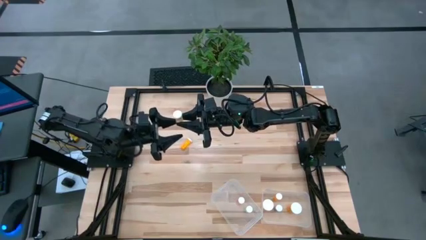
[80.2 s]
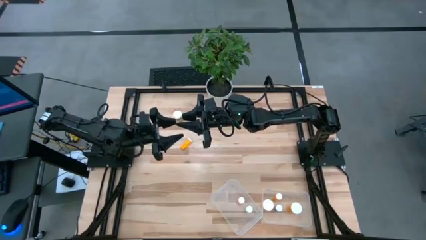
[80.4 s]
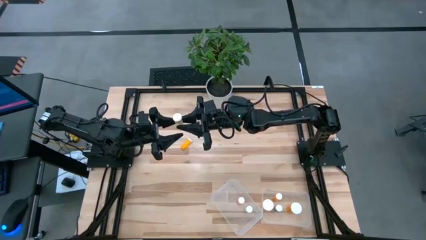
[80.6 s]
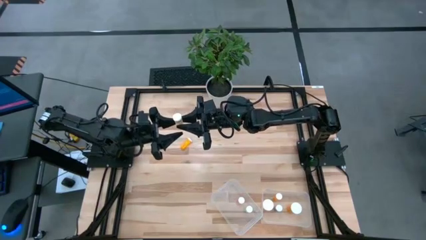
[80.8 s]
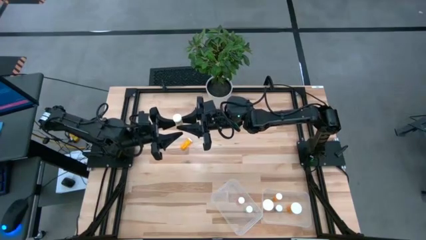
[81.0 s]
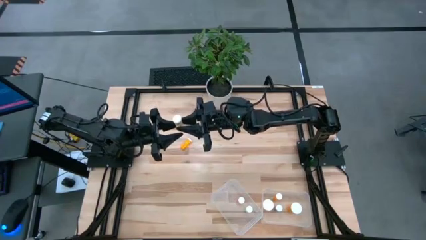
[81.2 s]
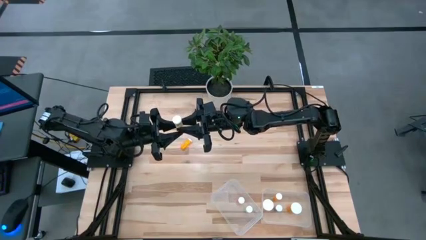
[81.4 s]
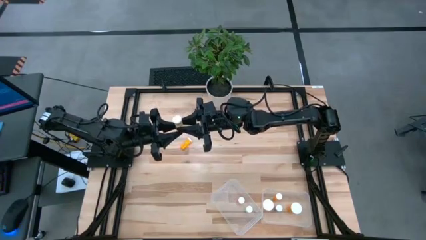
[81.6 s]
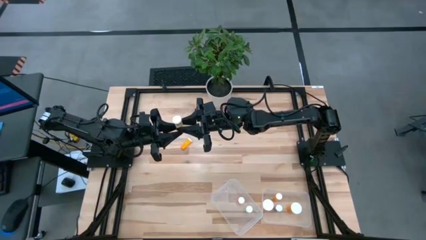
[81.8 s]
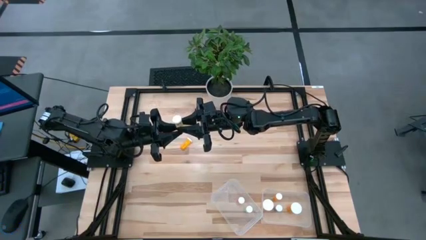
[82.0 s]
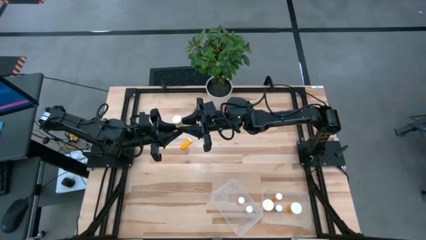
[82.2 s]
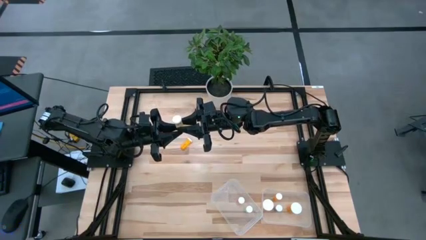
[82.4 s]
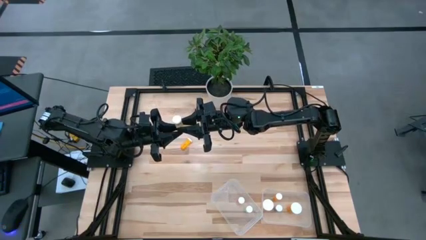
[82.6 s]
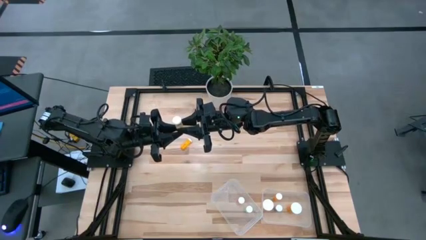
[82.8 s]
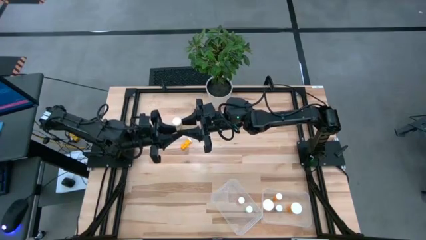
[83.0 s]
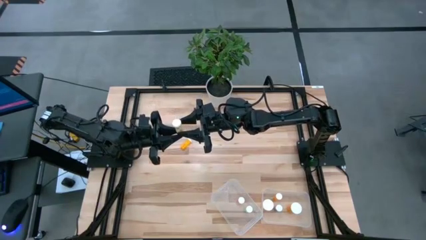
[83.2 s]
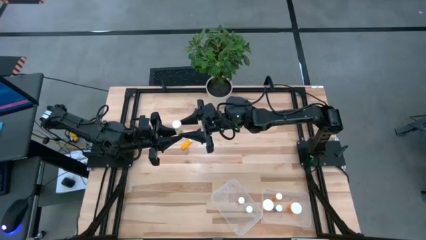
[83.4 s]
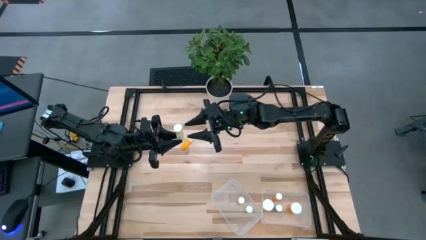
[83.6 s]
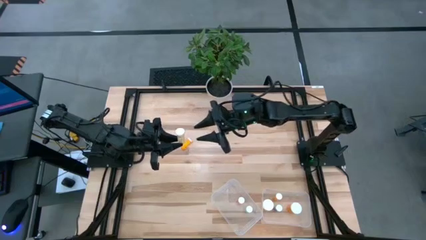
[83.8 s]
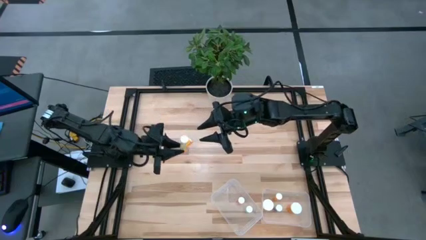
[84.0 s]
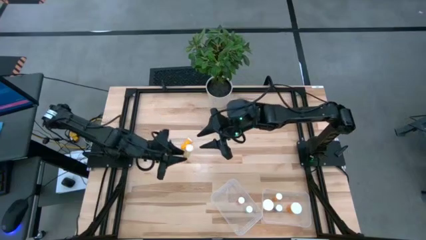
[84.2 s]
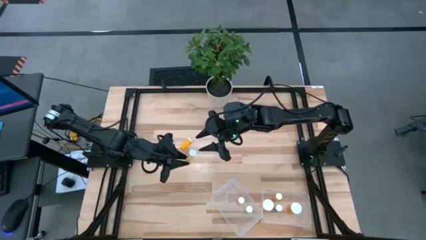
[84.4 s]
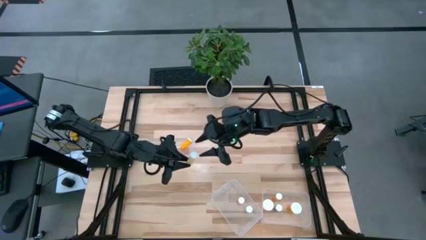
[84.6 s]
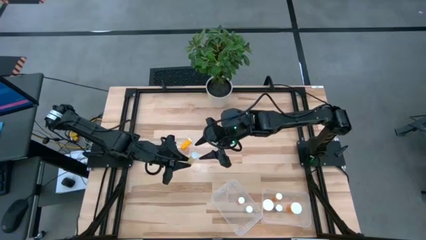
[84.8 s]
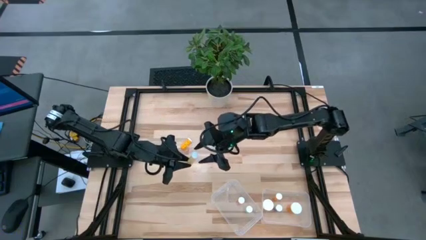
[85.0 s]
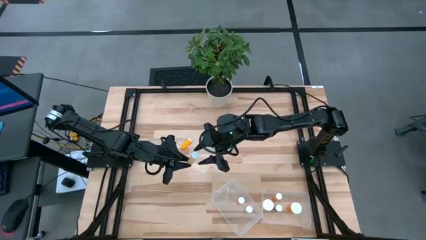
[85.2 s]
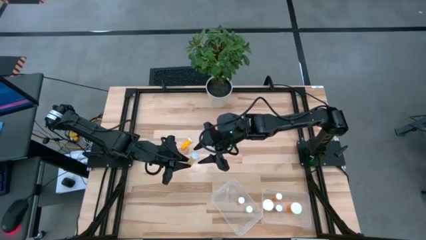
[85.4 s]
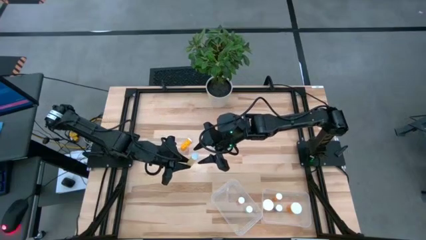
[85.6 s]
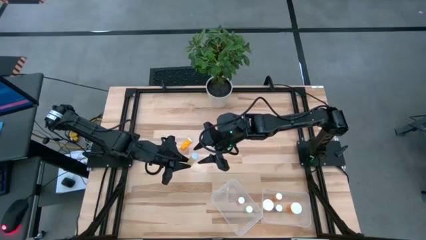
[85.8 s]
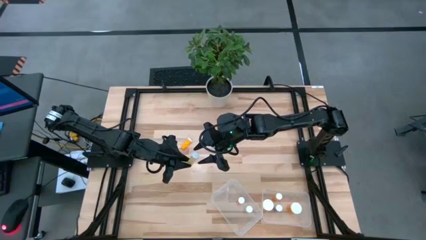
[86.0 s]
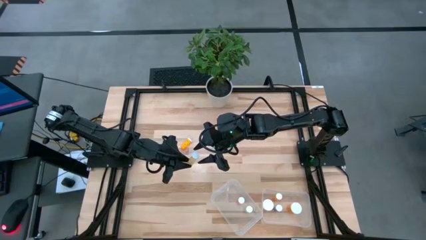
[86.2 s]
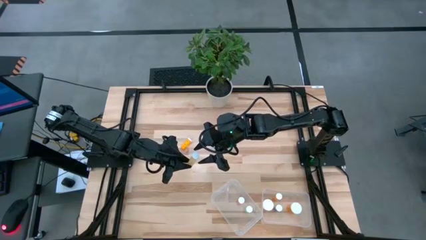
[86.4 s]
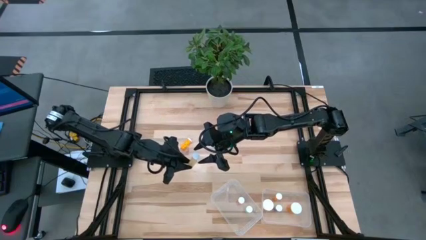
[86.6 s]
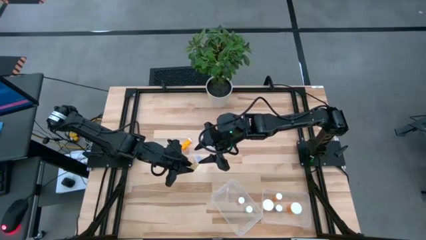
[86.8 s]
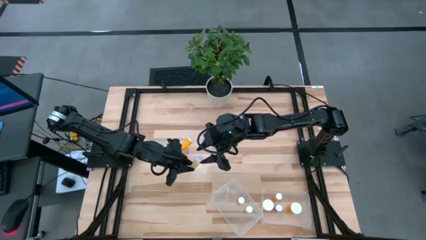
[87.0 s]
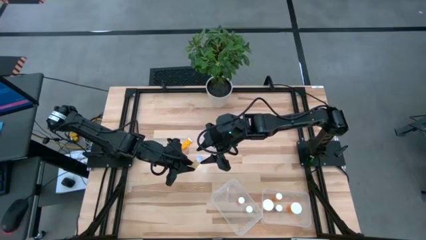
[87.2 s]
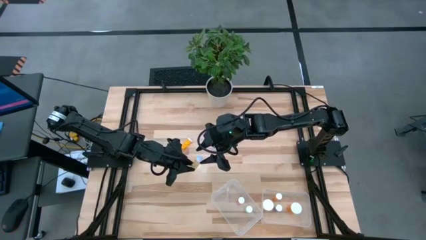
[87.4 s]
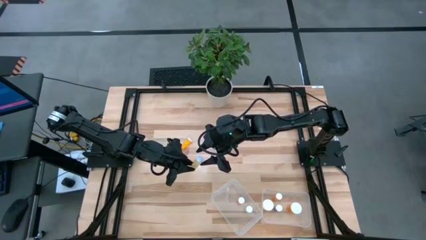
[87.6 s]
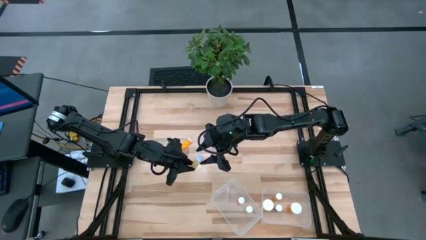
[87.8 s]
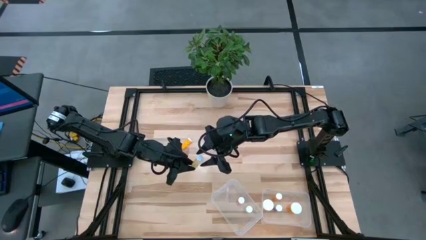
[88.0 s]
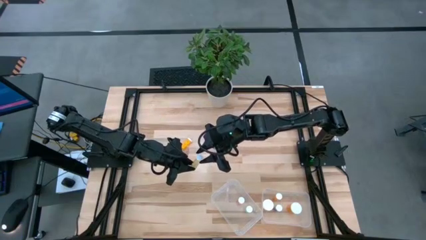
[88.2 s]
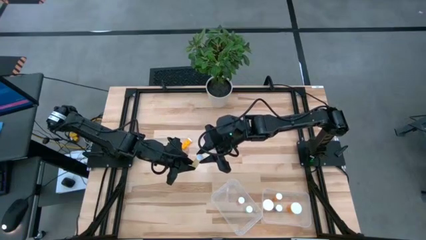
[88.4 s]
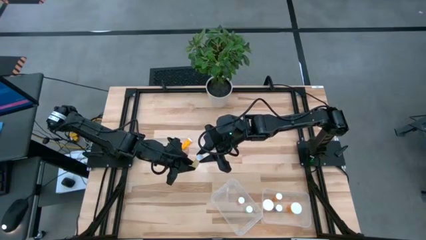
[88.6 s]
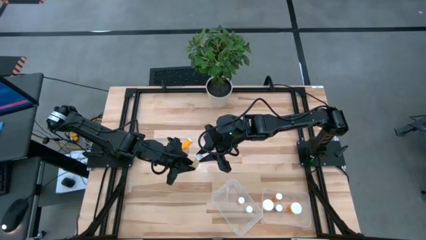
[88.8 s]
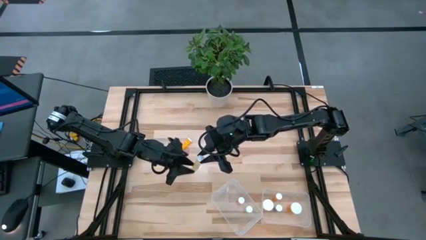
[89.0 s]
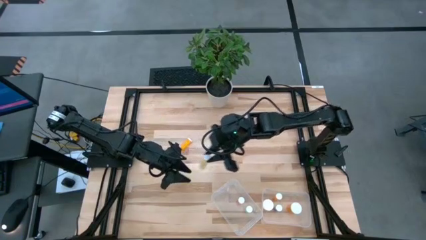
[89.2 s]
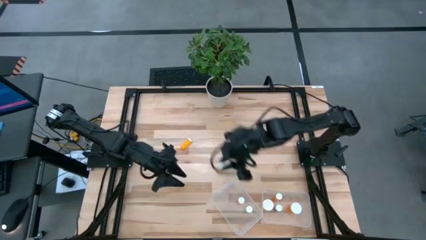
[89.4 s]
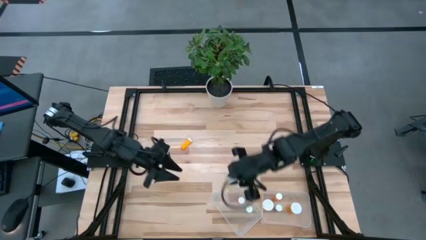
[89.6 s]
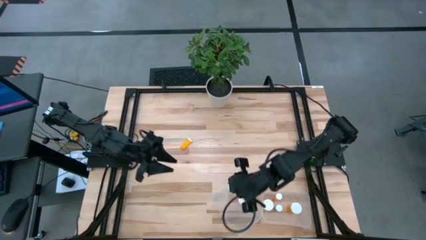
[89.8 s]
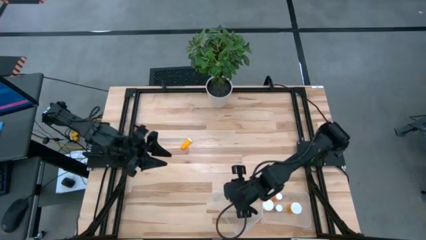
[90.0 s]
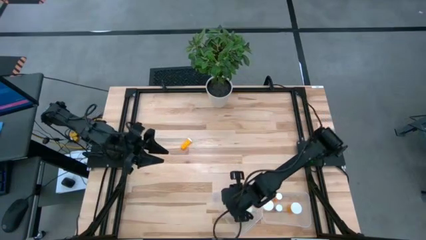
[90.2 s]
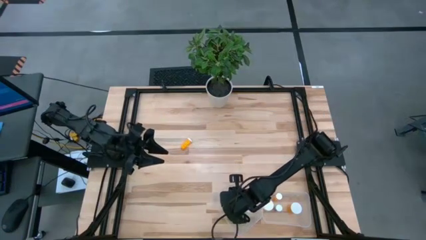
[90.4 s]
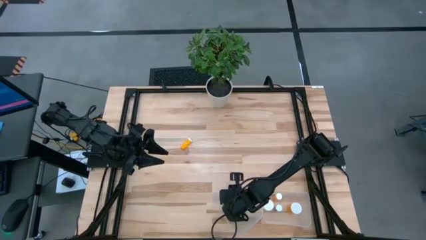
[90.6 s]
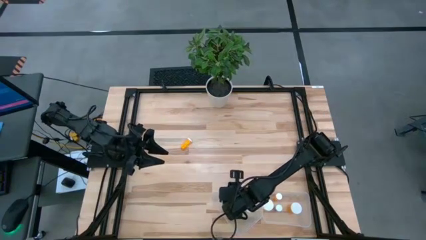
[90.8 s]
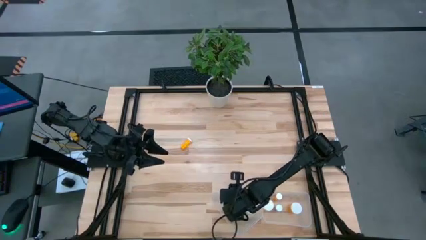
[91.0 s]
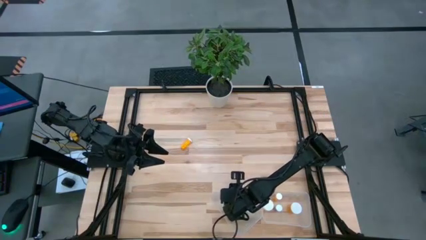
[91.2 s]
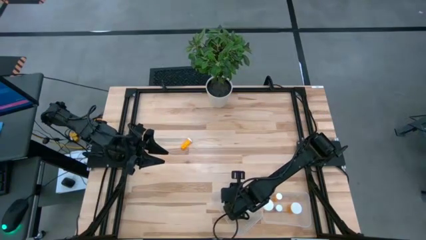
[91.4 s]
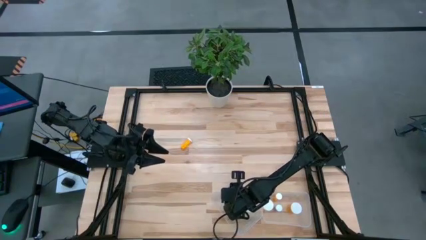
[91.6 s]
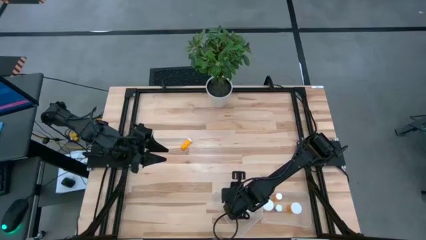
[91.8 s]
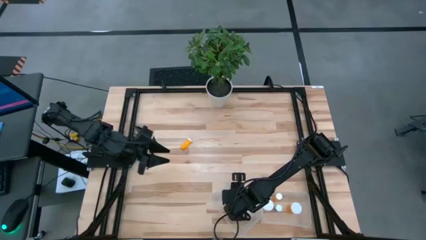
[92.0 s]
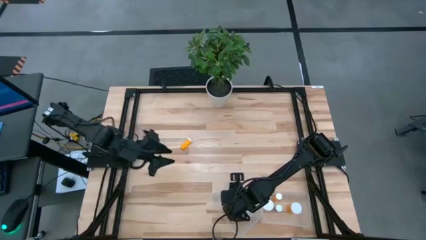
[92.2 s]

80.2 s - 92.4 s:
Task: Pick and place medicine bottles into bin by pill shape (circle, oval)
Put the yellow pill bottle into the left transparent bin

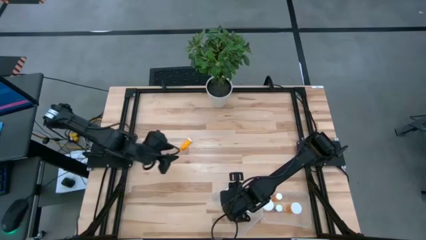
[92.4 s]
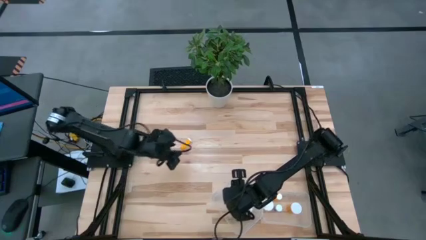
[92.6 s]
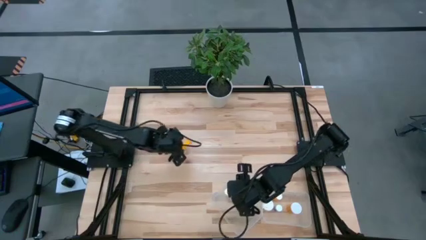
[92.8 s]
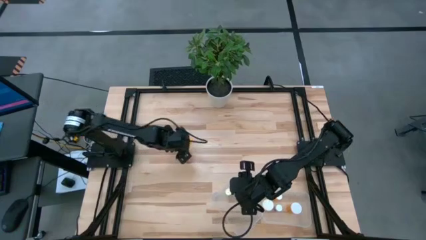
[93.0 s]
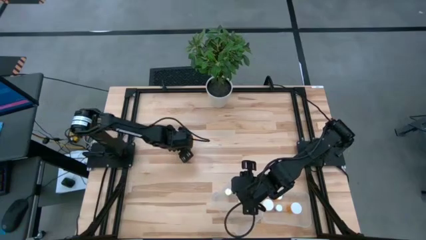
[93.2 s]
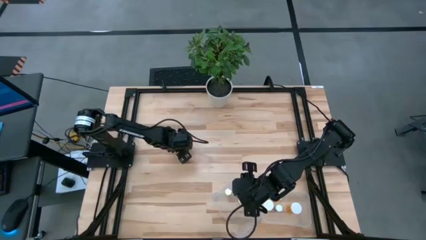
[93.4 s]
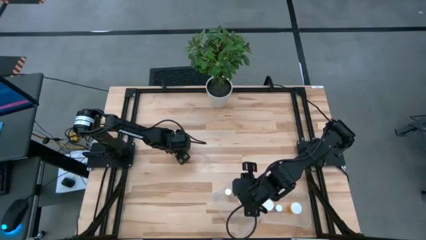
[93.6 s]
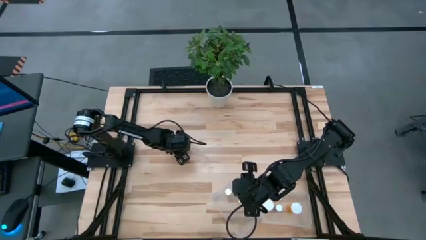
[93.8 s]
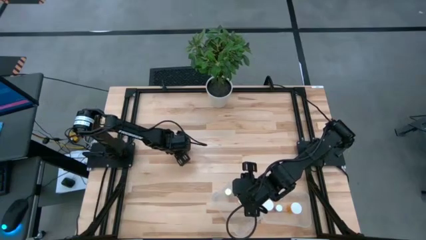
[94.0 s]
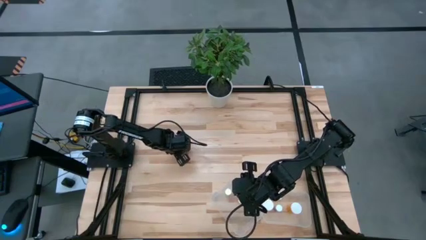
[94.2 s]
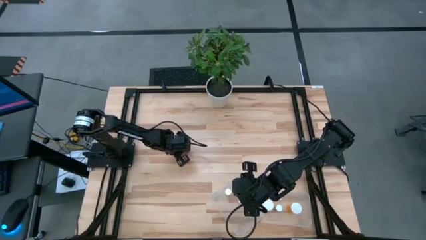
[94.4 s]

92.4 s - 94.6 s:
Put the small orange pill bottle into the left transparent bin

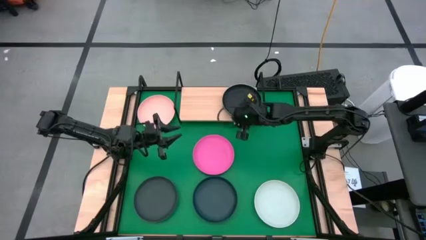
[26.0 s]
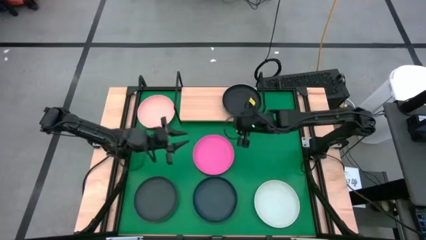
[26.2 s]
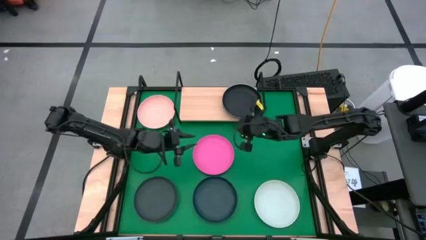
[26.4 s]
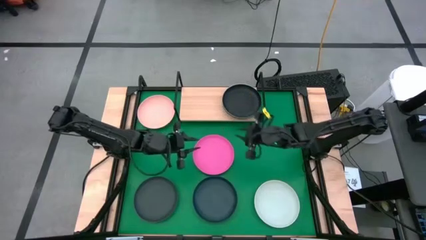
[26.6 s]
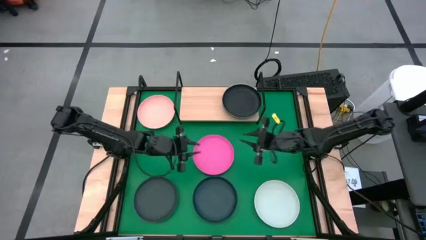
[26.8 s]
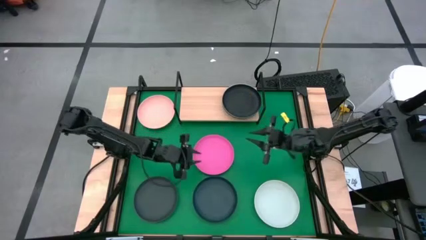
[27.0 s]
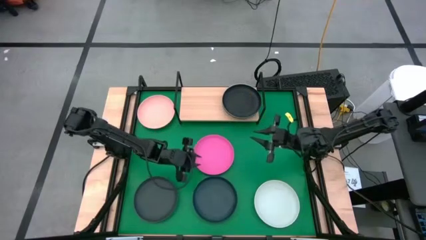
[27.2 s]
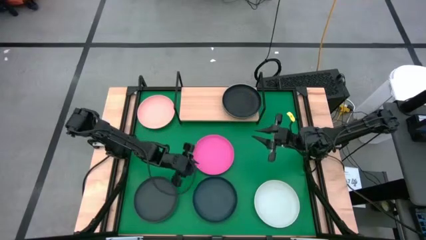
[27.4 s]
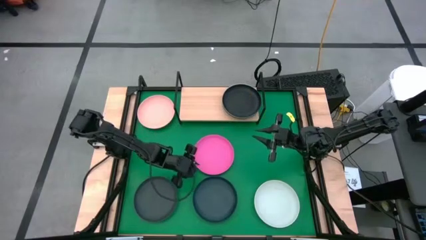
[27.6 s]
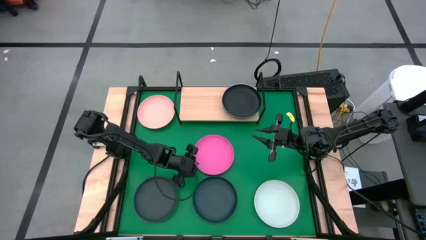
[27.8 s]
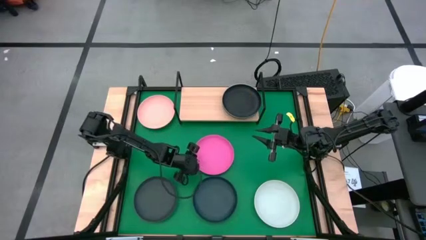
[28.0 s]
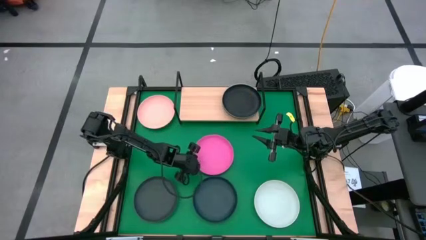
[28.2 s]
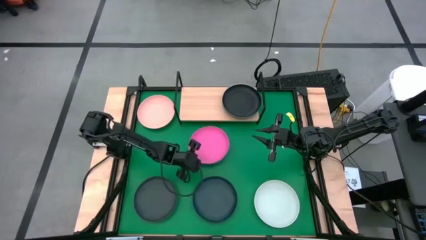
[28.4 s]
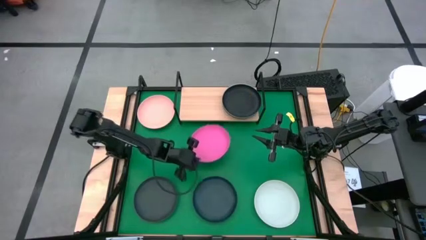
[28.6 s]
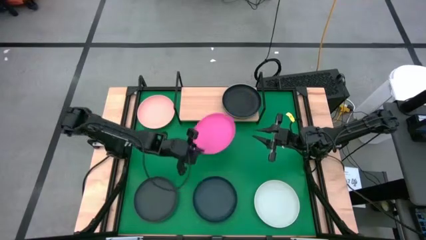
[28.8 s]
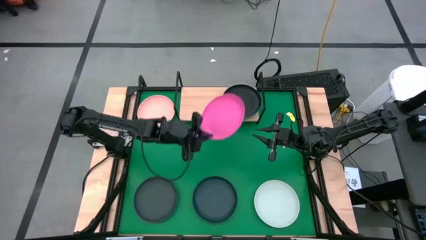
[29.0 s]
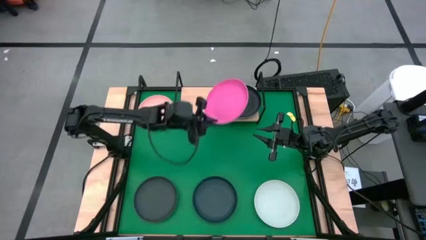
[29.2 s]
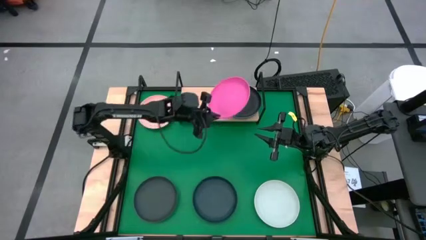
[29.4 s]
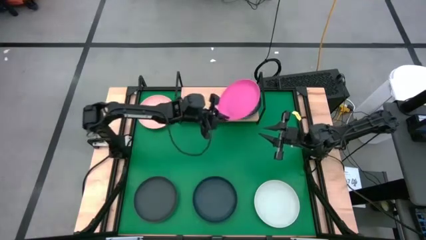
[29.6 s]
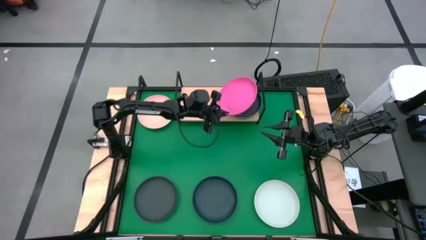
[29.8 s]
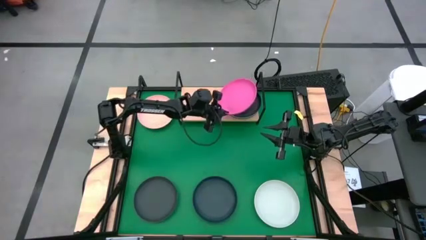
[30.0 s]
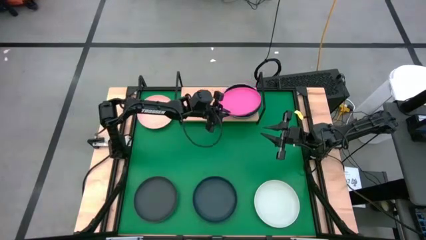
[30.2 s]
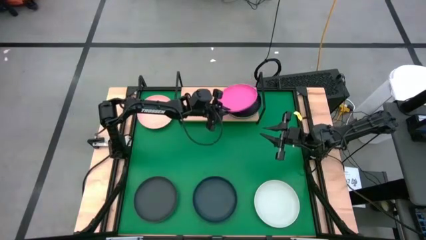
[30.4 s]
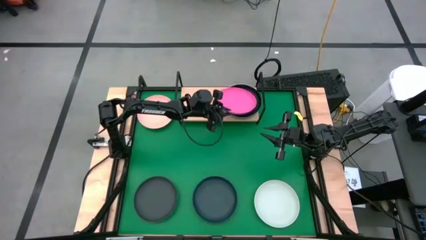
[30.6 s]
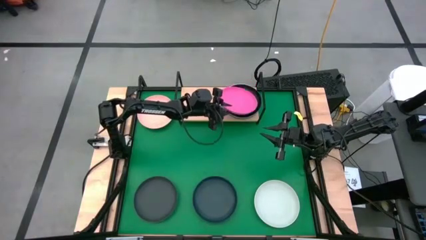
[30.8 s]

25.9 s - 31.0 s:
Task: Place and stack plates onto a shelf
Stack the pink plate on top of the black plate on the shelf
